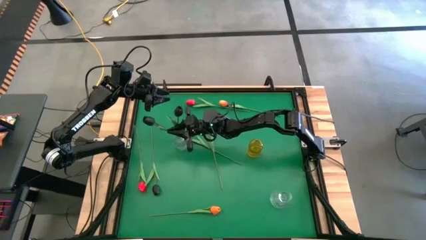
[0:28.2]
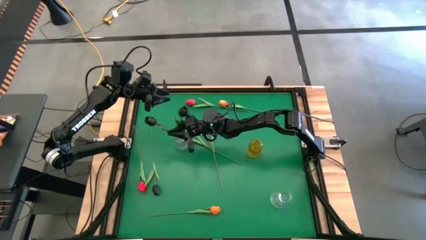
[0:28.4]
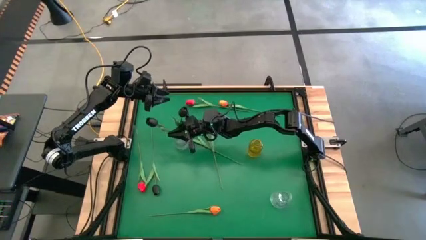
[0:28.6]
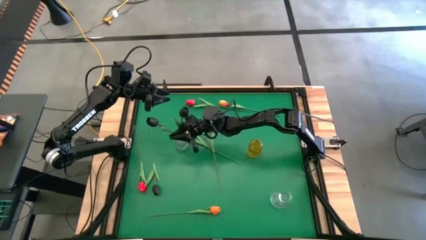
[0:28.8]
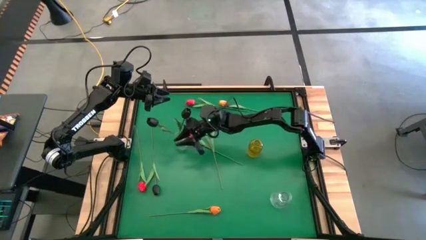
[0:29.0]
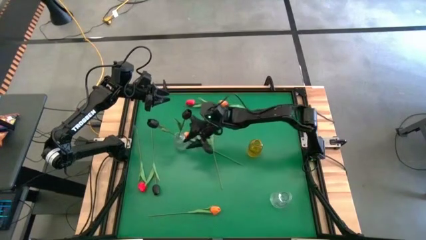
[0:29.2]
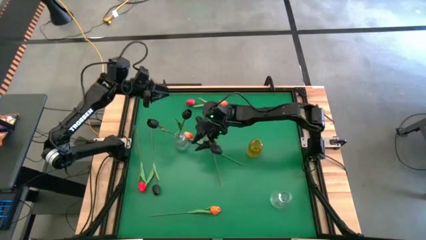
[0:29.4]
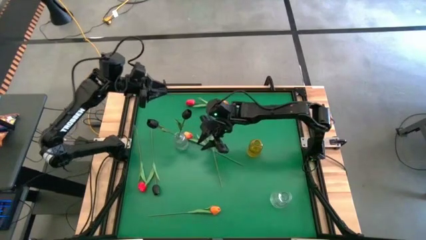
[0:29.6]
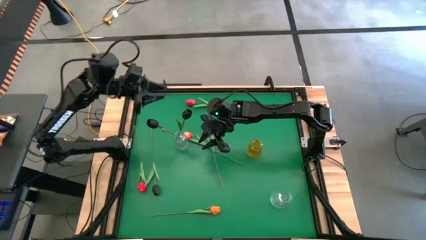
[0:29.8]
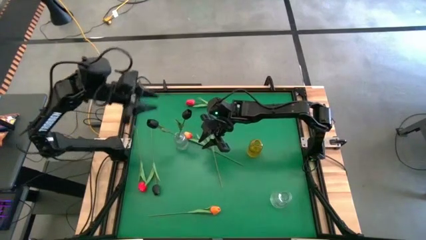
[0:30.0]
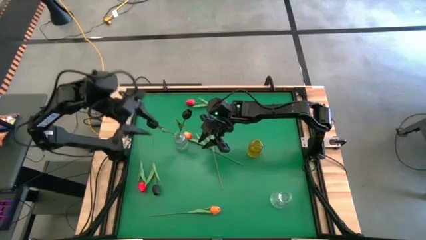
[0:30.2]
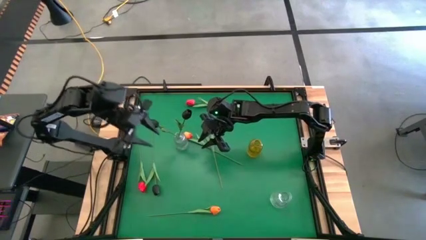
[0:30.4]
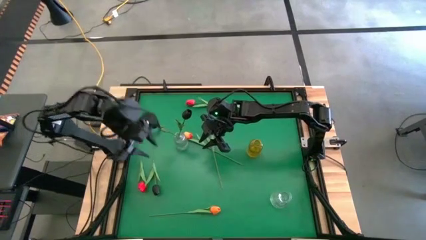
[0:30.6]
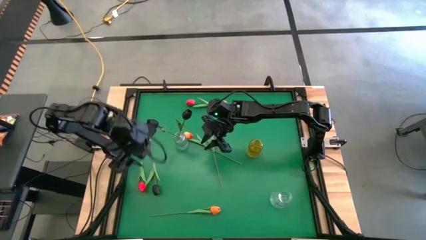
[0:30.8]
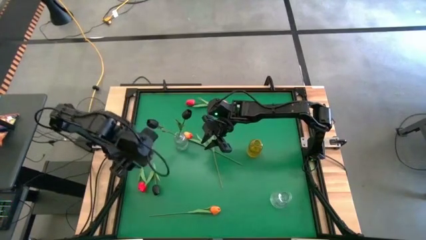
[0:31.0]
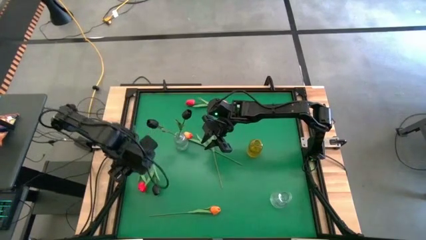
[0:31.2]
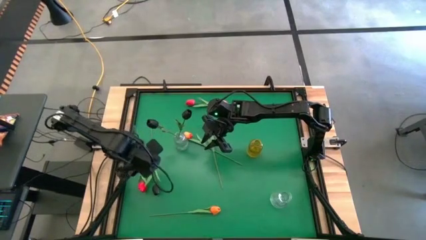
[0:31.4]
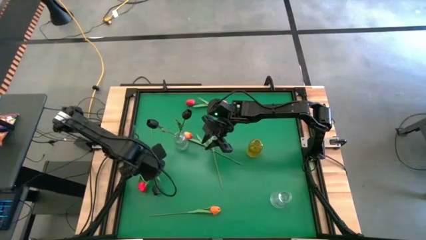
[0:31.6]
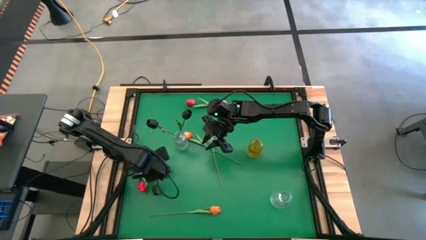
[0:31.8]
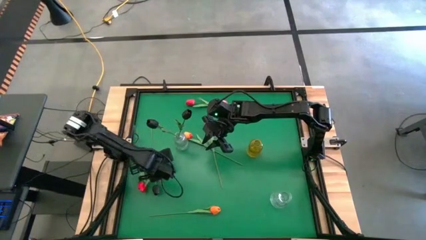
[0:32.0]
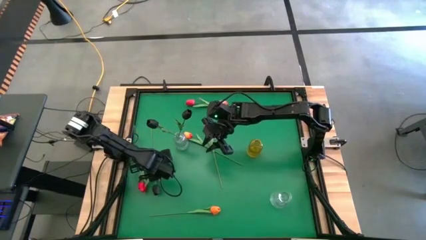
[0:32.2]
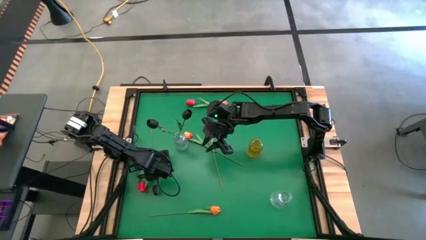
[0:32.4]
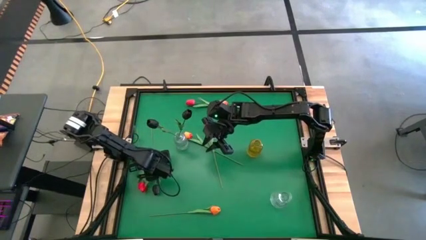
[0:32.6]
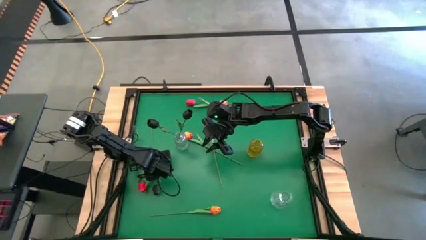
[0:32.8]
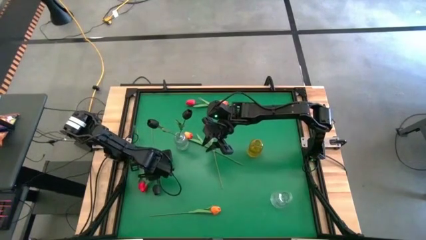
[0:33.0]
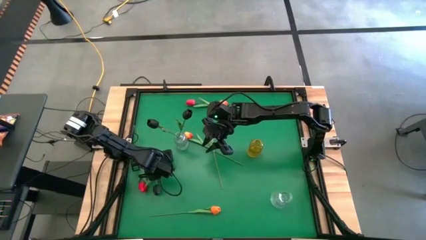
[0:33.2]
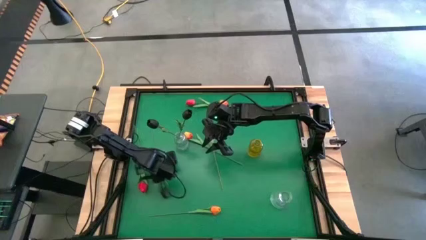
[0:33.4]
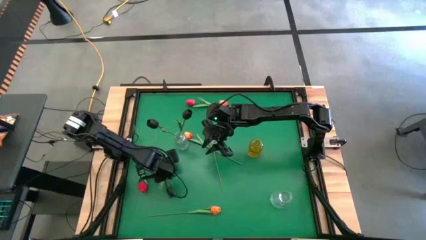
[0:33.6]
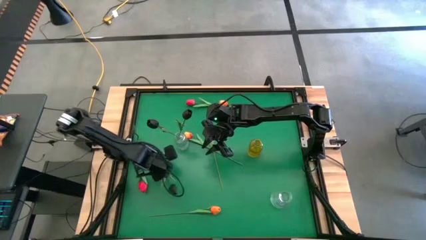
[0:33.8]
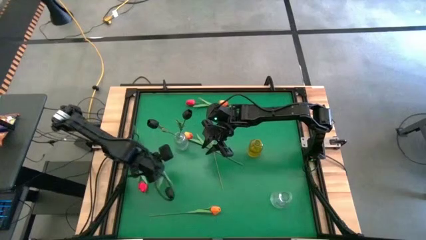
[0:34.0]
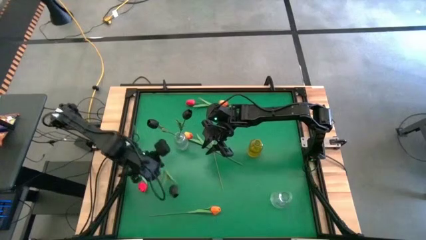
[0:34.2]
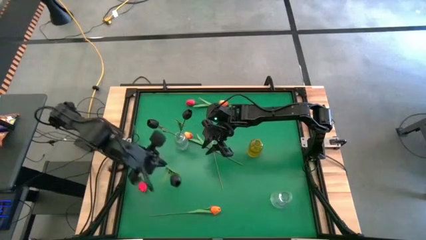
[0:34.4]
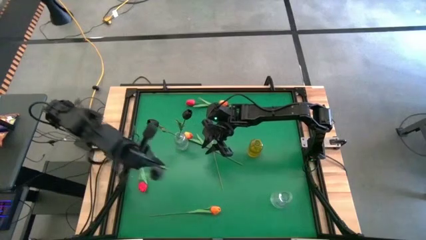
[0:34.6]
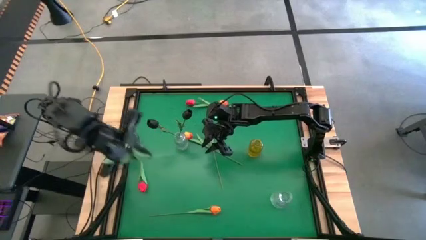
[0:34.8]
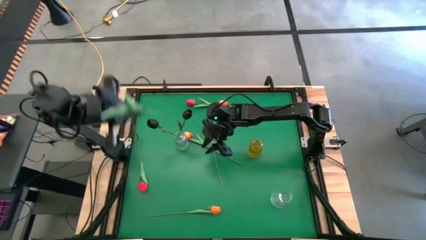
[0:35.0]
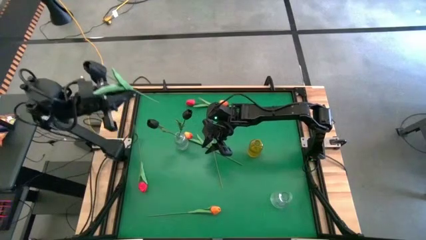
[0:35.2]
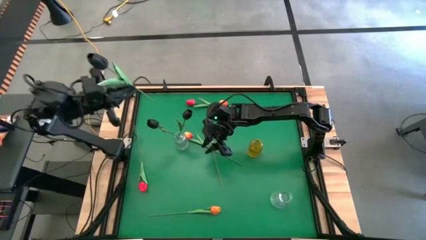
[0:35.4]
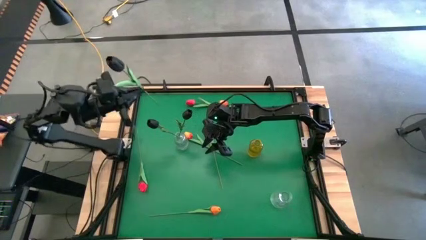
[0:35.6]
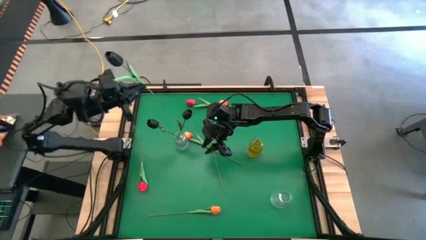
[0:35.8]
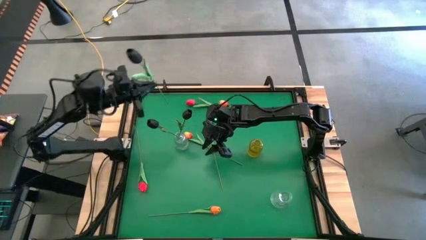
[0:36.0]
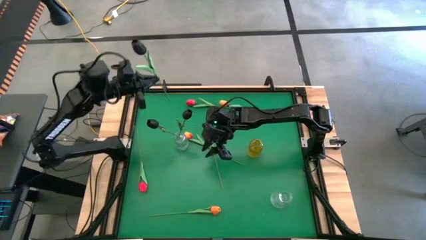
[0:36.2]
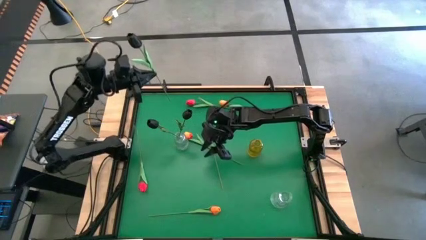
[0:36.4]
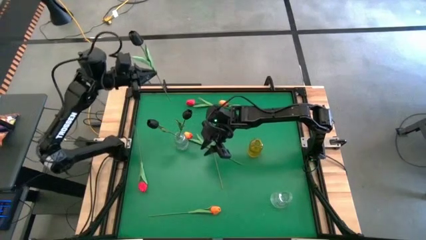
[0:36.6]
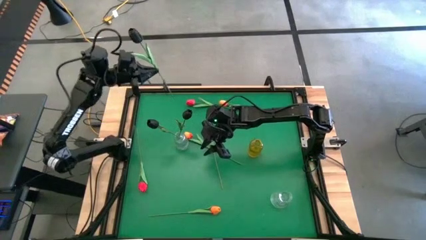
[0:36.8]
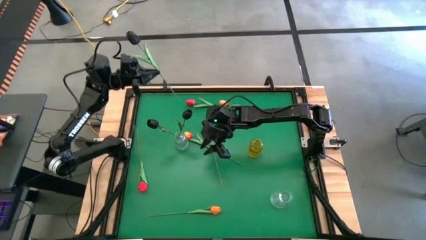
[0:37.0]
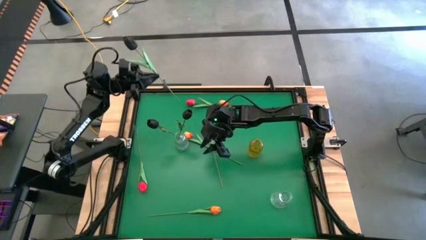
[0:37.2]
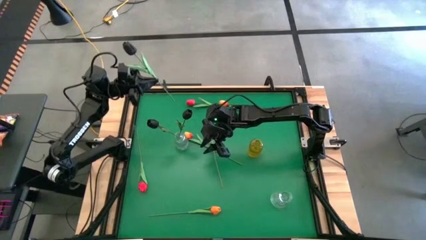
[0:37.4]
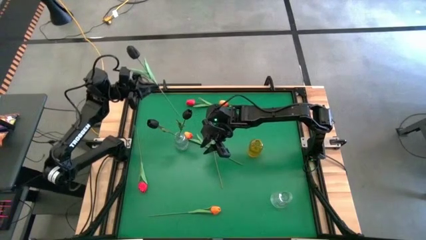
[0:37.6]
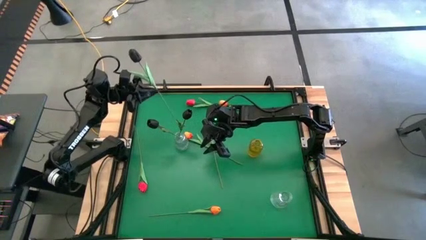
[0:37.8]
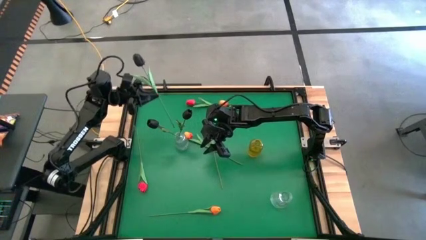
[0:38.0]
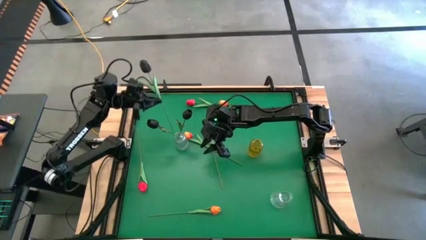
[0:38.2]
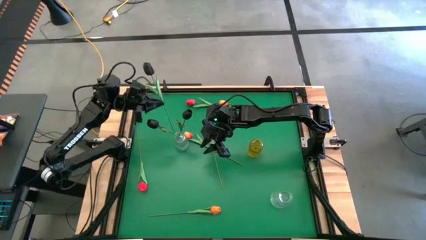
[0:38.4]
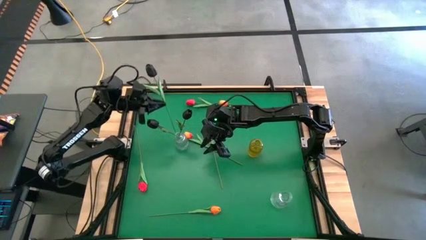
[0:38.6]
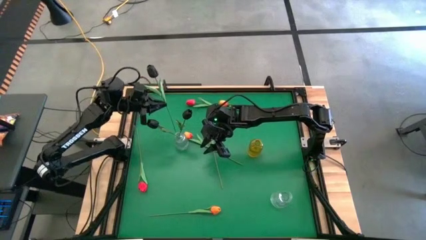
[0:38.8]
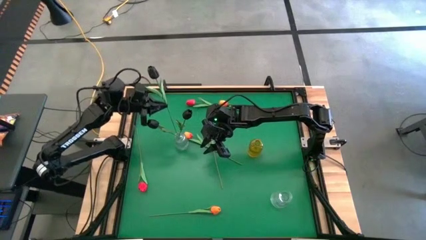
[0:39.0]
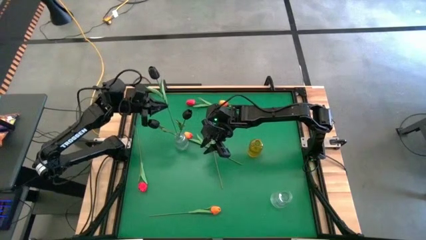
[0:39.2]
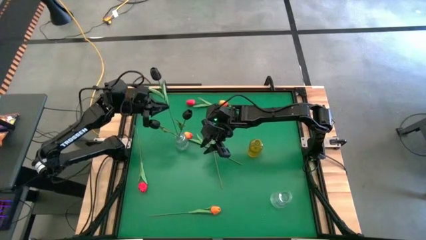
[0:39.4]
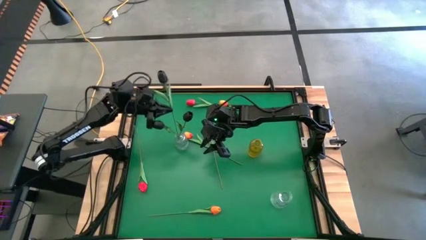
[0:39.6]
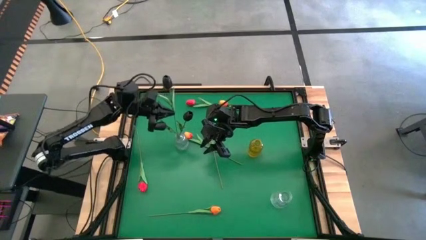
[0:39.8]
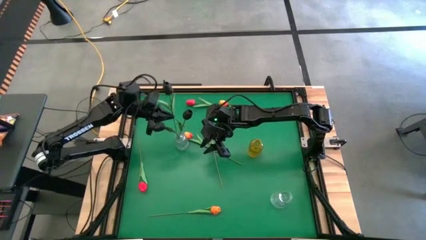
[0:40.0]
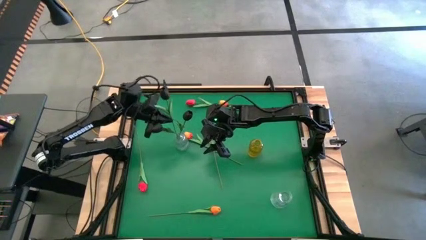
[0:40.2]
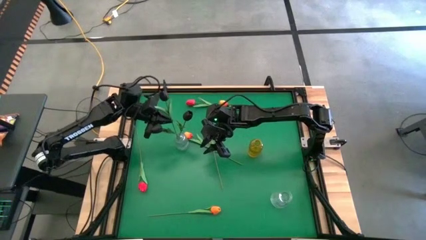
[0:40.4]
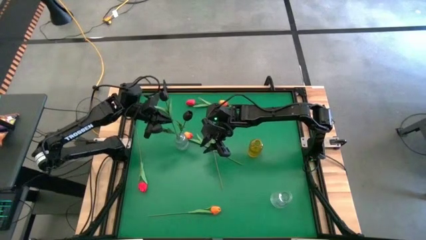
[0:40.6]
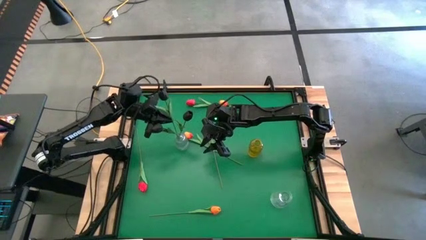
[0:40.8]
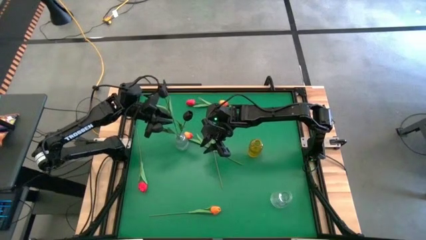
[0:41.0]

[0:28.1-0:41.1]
Task: Sort flowers into vase by color
Put the black tulip into the top transparent vase

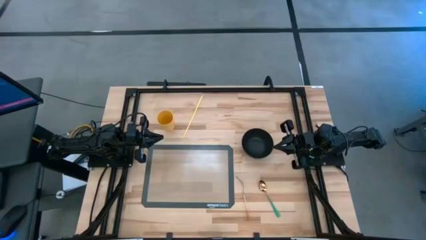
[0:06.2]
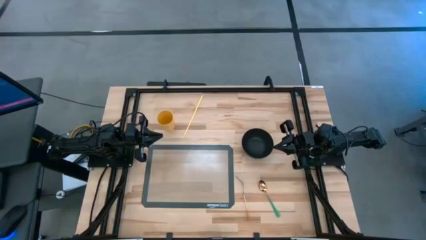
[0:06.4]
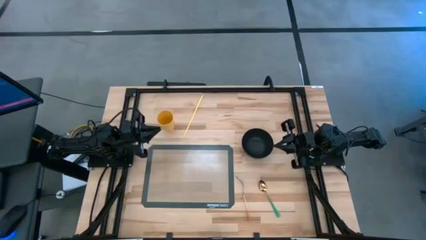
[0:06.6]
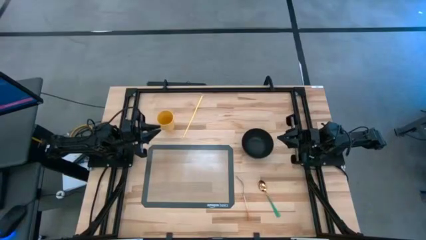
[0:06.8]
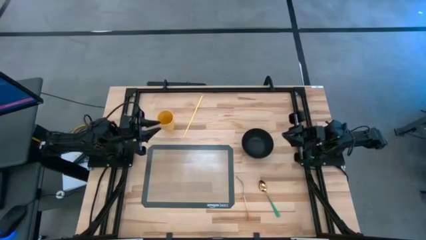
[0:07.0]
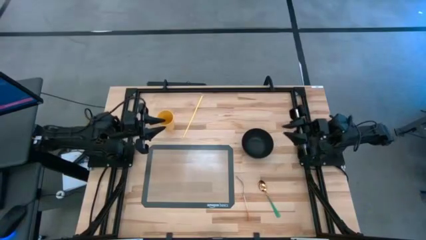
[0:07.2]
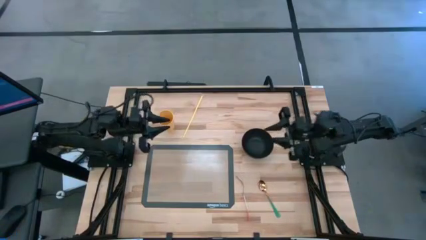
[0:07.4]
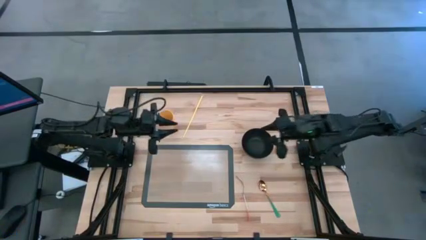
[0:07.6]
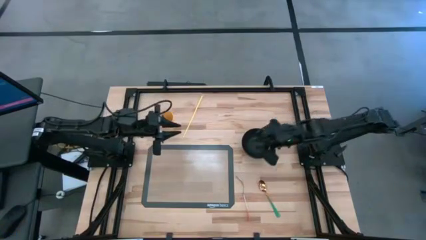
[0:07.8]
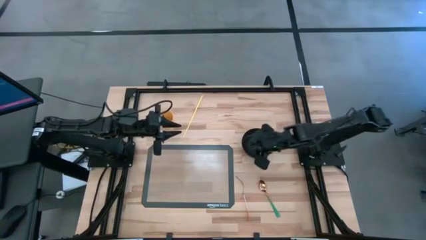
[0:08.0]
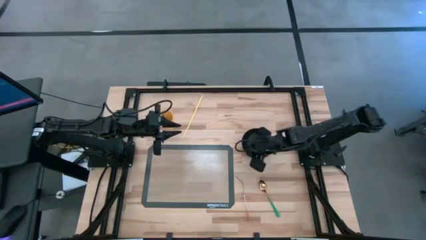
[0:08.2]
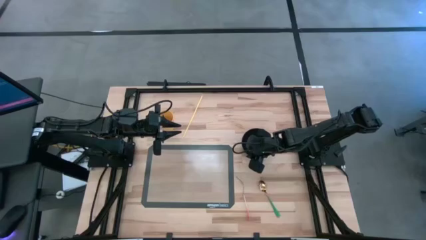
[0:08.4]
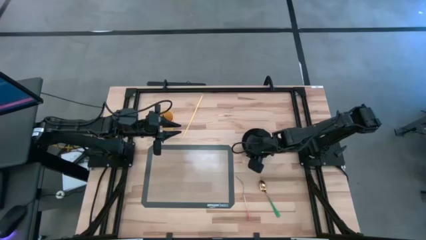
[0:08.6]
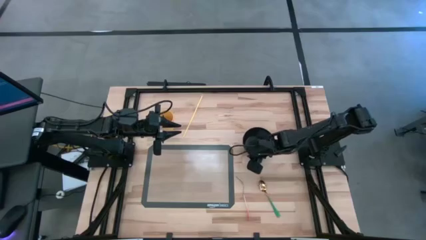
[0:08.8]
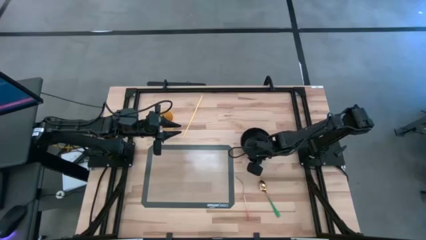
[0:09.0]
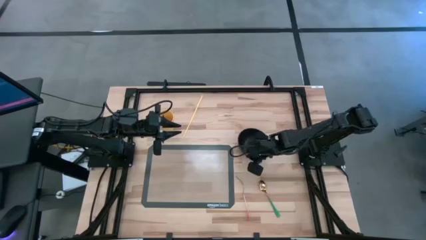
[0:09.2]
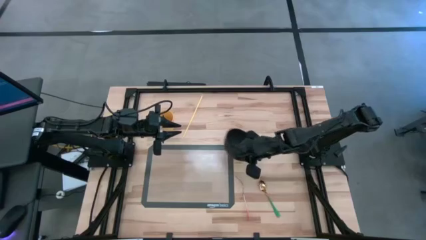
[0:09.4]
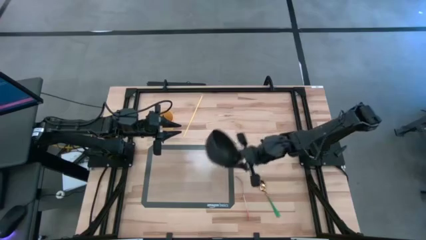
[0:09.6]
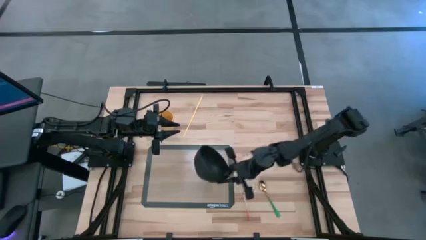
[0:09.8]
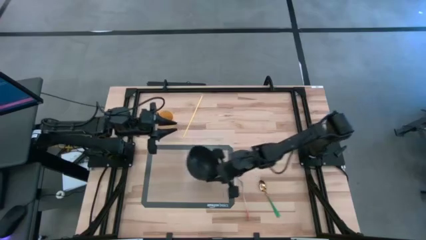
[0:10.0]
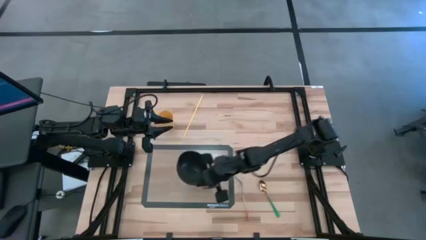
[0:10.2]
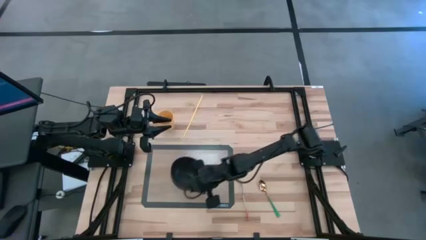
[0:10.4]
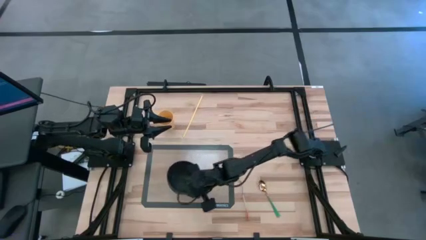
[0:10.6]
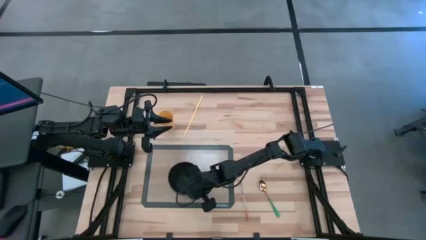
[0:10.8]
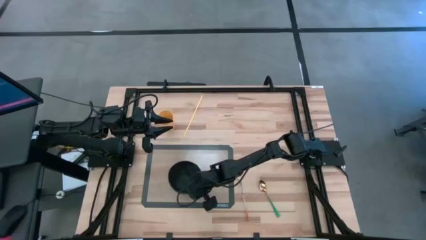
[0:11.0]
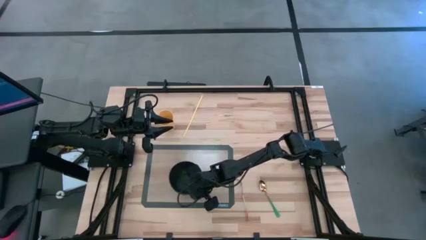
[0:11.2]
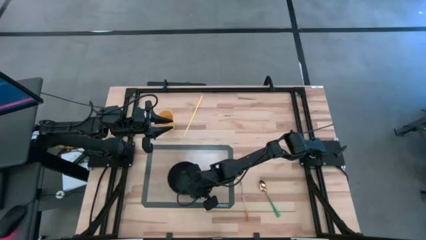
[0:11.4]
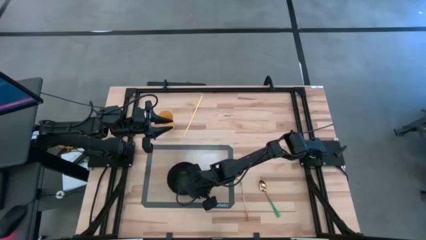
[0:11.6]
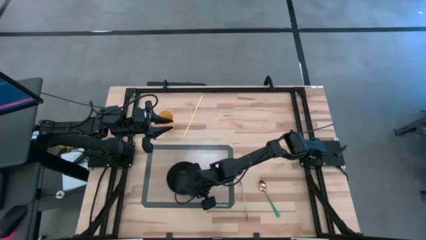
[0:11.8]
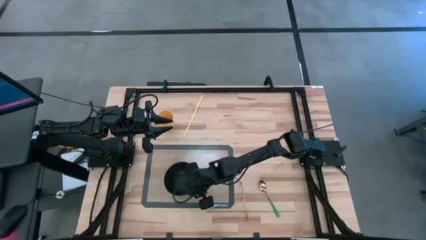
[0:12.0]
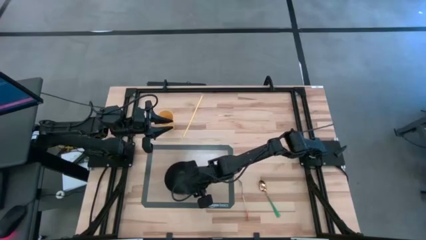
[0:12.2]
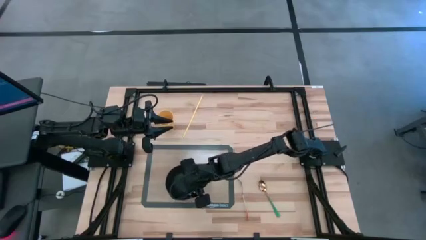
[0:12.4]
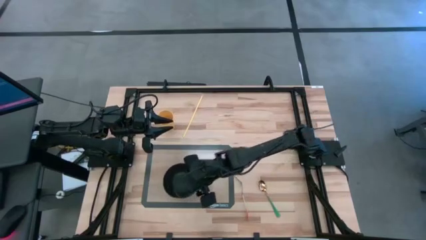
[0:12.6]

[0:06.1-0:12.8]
Task: Pick & Place Utensil
Put the black bowl in the center of the silicone mat
